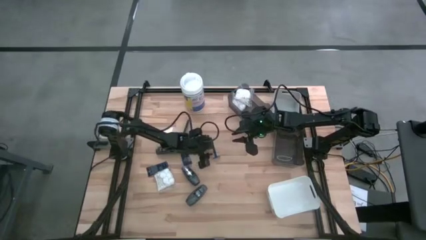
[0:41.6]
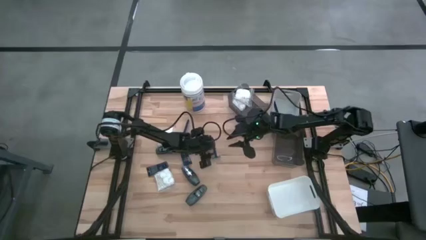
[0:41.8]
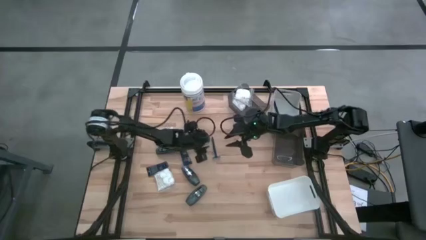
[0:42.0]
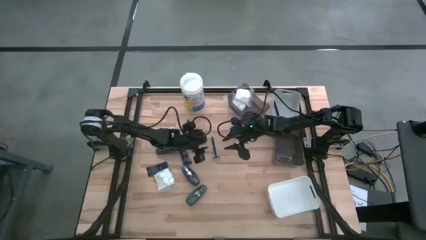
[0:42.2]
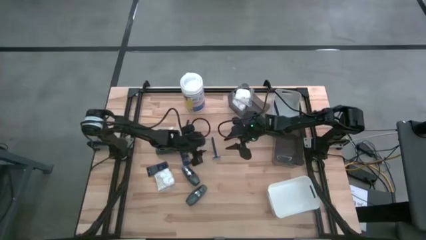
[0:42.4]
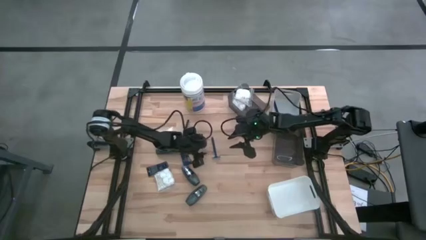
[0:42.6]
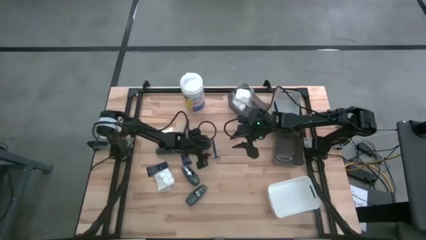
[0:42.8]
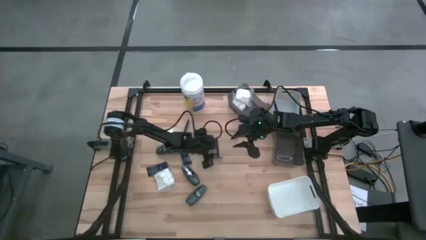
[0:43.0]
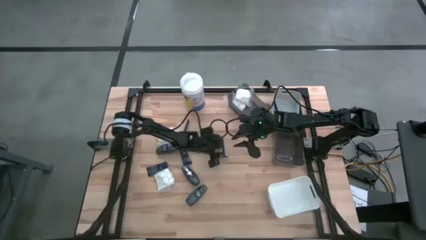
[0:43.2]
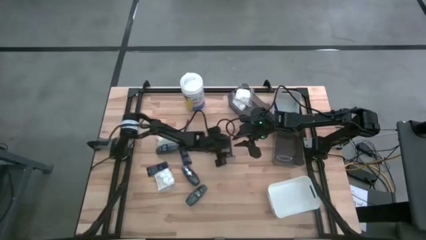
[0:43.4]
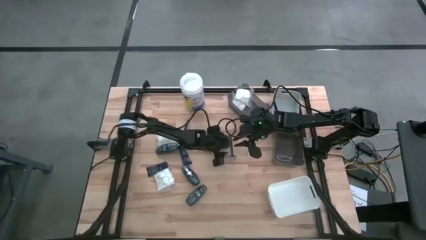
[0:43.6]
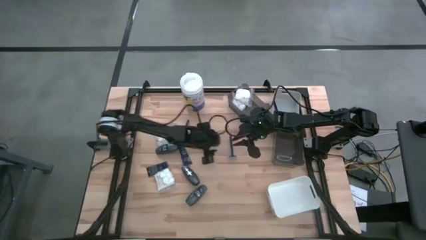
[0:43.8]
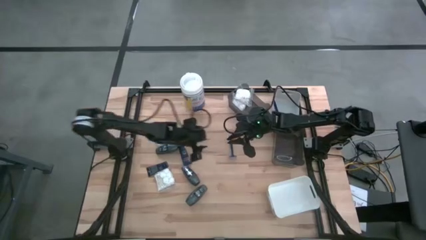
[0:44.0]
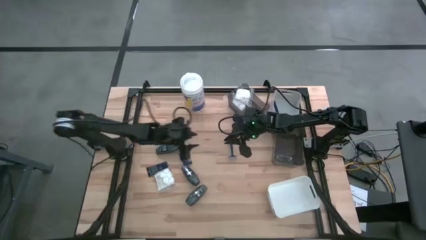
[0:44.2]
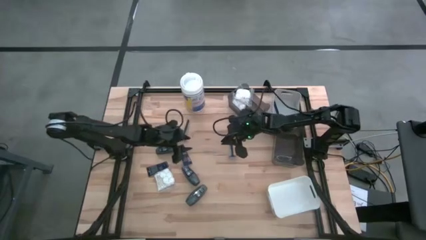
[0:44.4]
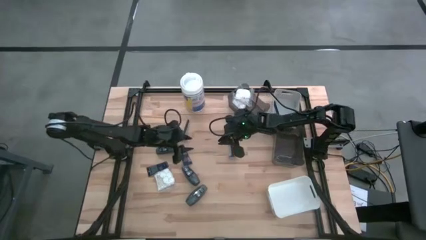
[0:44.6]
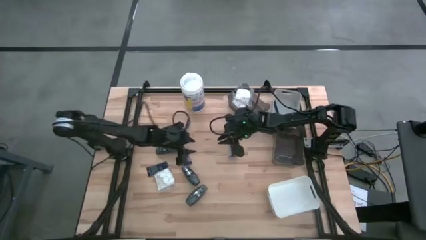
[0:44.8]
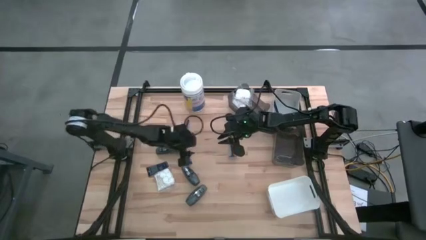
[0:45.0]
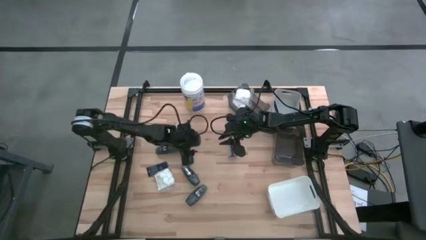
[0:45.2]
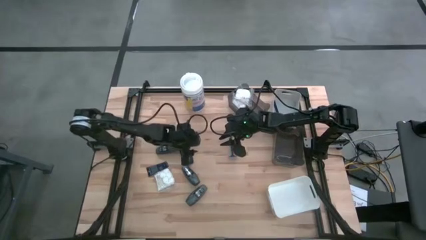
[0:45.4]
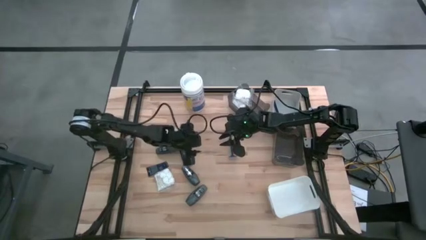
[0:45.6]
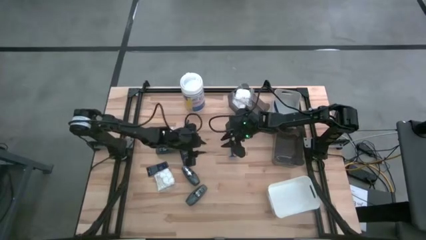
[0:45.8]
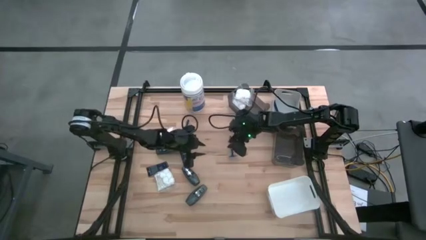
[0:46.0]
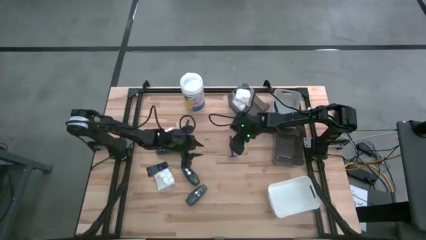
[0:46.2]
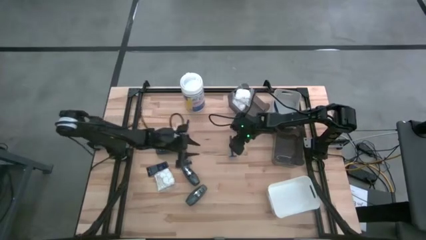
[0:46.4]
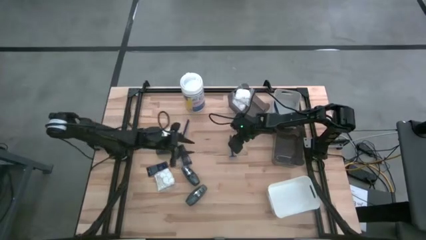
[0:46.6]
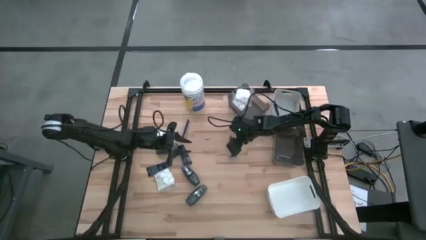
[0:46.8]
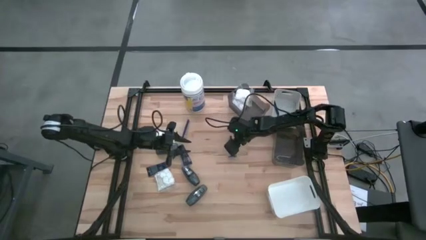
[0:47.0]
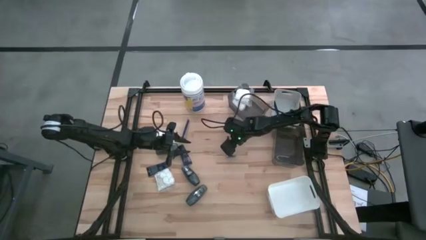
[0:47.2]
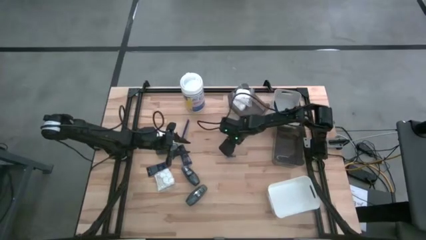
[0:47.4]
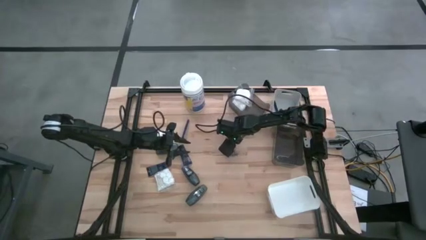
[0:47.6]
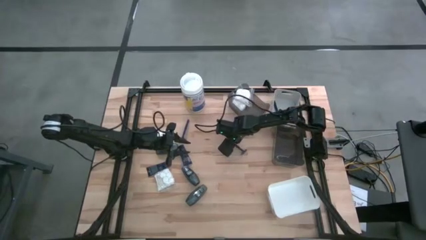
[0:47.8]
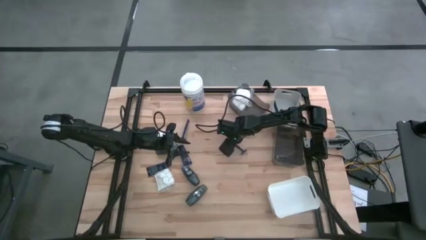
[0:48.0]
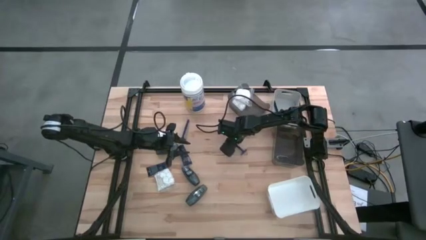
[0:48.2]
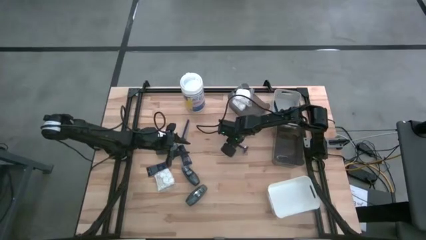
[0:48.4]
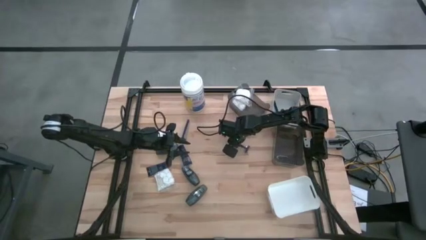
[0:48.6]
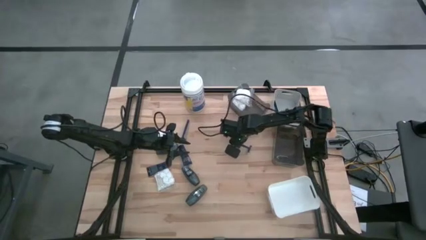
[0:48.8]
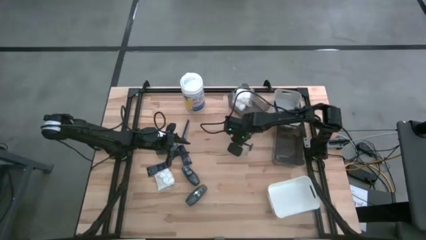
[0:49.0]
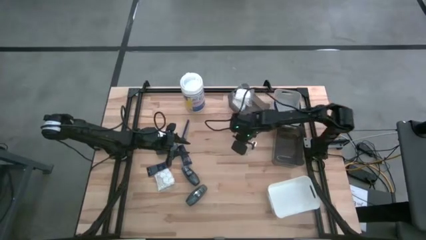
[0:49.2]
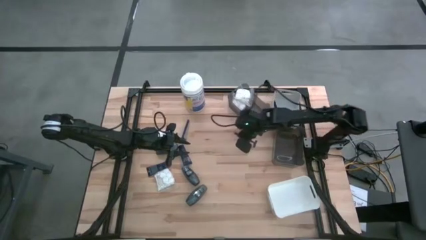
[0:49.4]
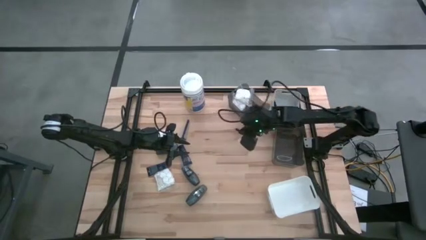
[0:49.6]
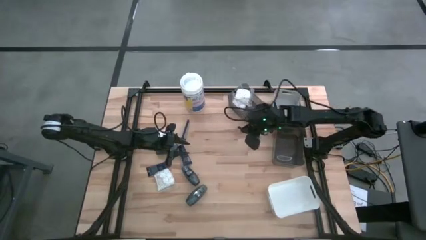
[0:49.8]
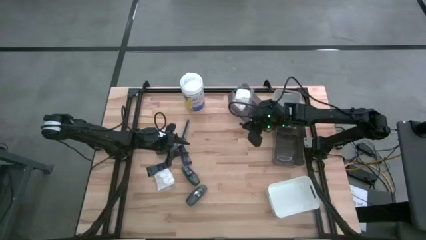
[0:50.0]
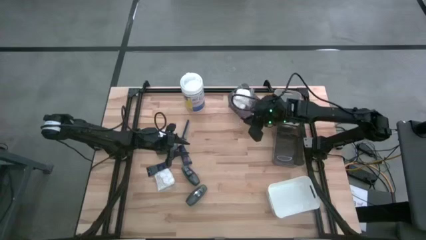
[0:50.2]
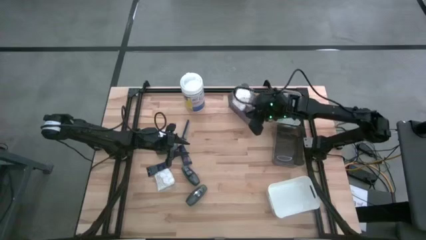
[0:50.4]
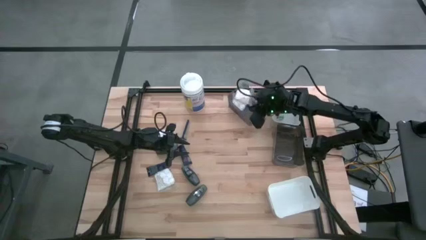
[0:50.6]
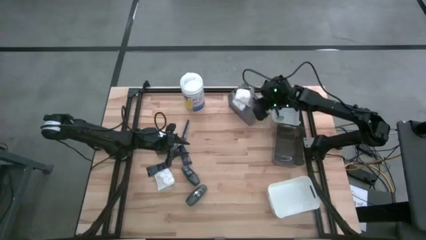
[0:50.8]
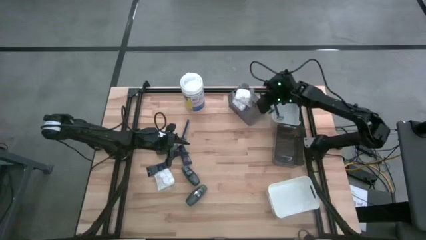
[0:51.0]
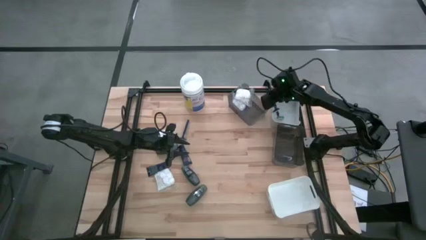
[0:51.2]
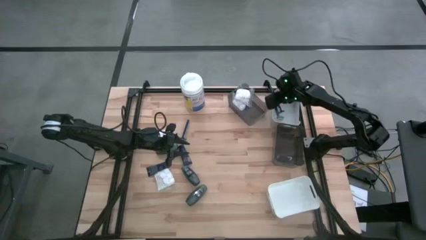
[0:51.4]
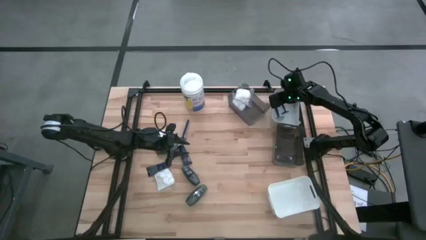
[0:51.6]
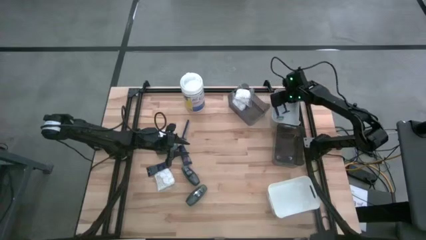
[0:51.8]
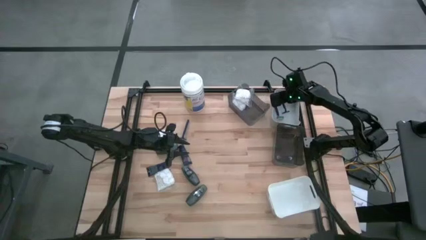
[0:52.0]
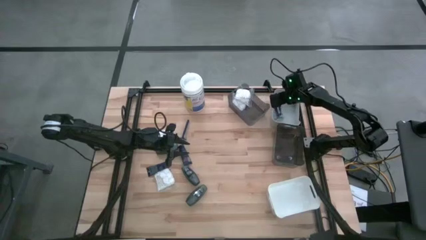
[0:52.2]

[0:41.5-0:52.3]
Task: Pick & Place Travel size toiletries
Put the right blue razor into the gray bin
